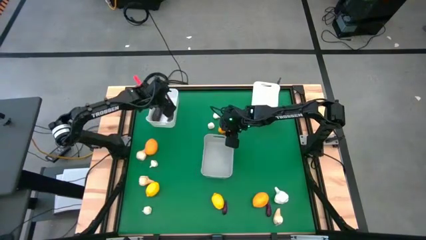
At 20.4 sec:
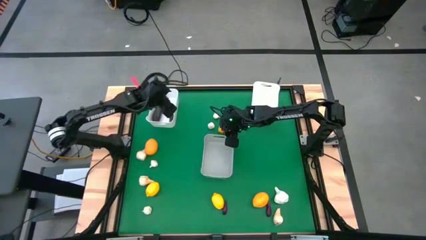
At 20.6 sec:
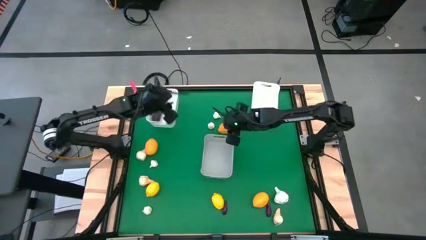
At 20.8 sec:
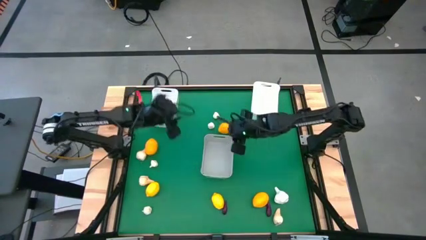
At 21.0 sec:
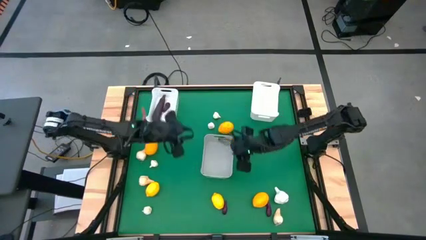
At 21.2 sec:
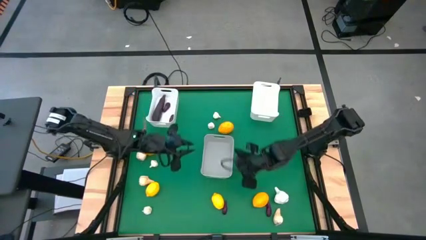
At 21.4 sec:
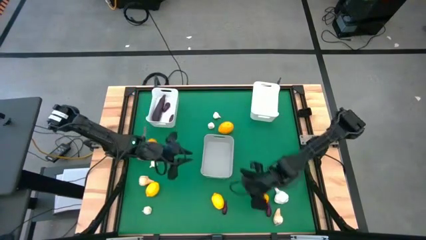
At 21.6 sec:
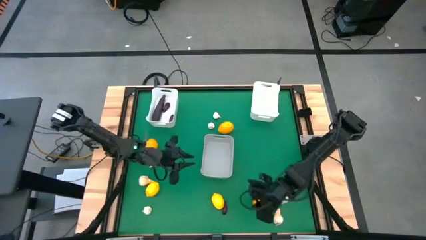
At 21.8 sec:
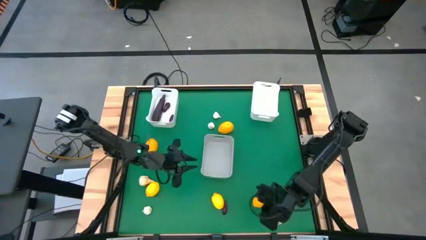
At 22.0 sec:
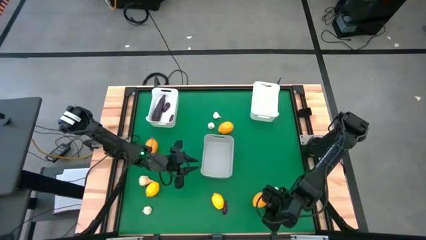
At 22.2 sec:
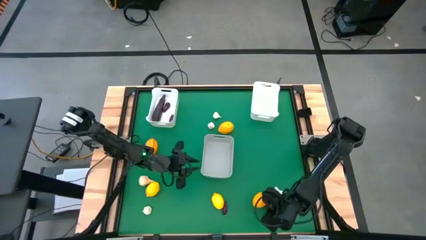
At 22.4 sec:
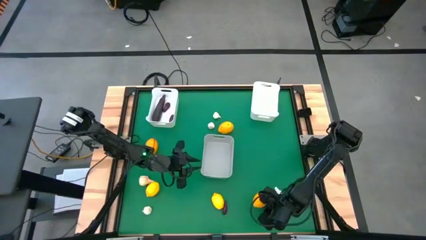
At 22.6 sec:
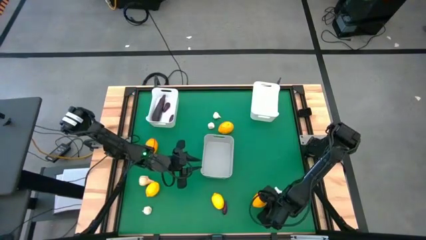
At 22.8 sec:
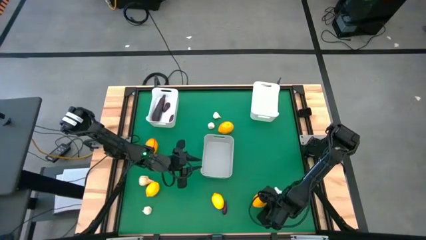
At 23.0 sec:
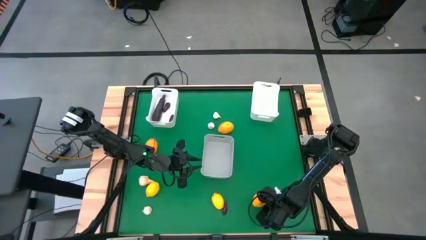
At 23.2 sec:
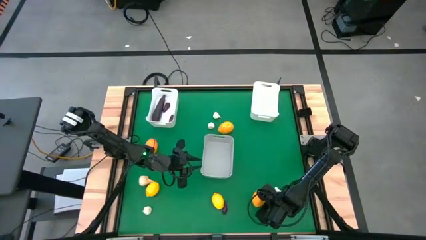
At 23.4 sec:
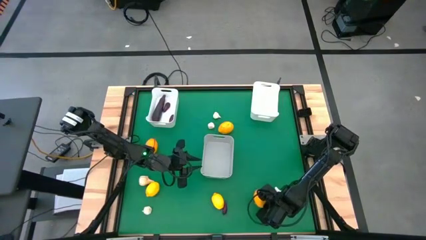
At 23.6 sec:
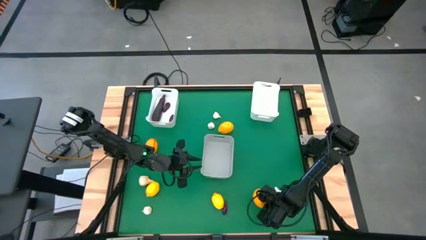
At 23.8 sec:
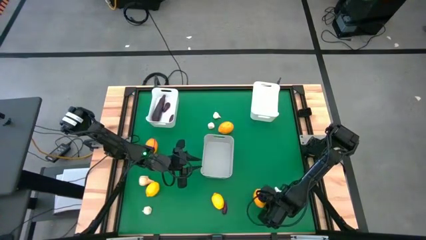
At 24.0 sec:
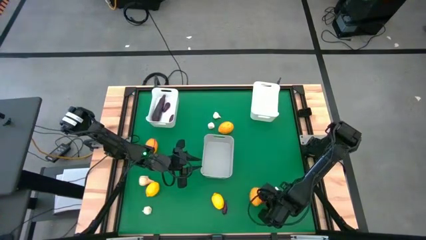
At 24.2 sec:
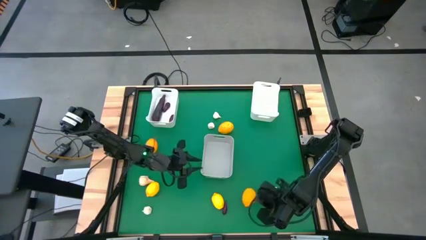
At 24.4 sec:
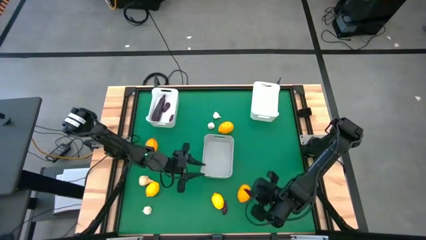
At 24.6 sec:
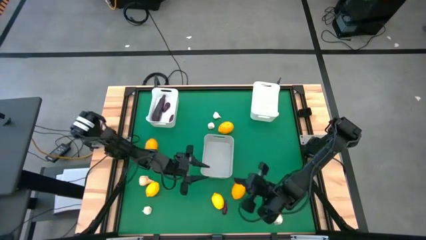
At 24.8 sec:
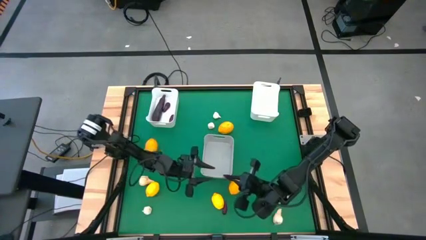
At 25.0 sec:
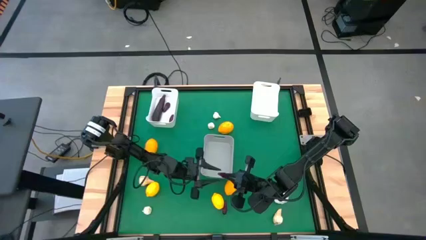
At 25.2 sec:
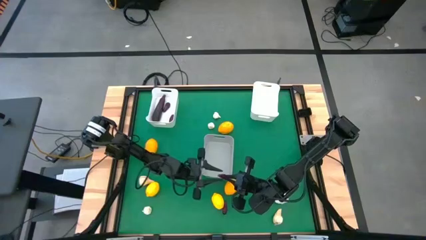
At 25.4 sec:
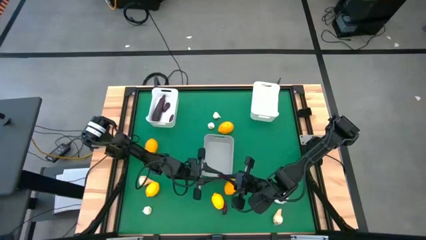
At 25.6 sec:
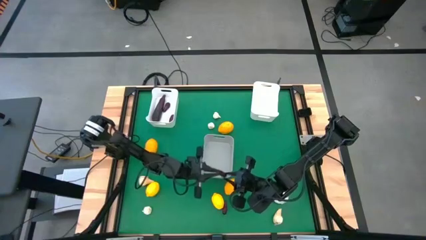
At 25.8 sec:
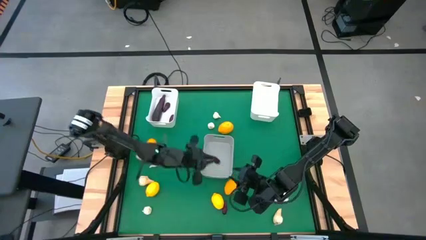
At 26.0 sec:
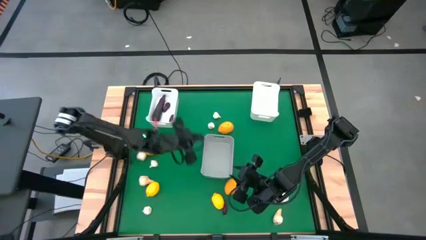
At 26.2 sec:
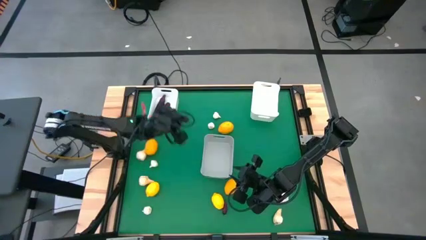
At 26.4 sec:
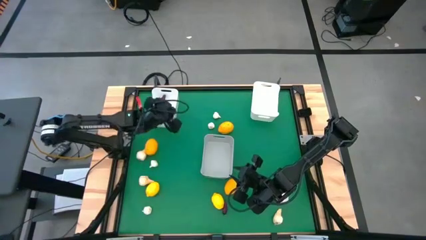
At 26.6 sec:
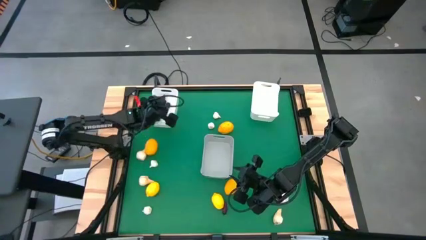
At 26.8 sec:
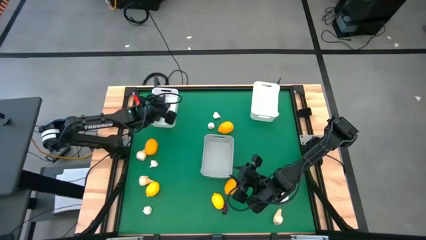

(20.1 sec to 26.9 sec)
Task: Sort produce into baskets
Put the eggplant into the left white bin

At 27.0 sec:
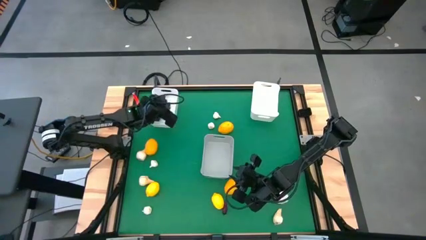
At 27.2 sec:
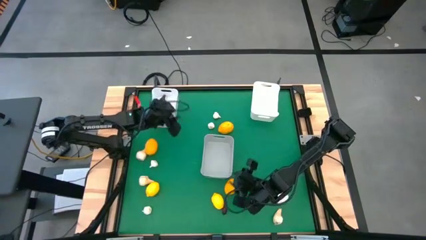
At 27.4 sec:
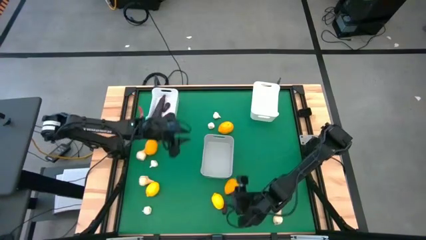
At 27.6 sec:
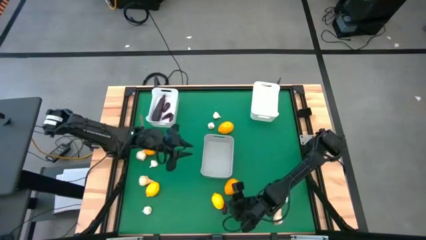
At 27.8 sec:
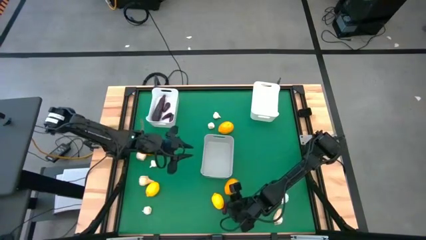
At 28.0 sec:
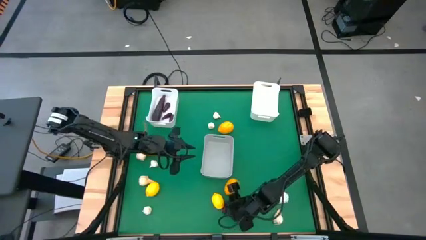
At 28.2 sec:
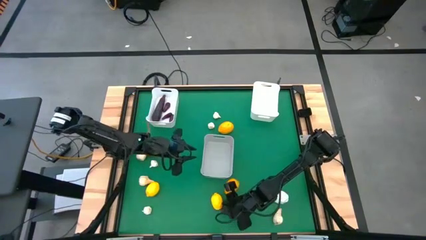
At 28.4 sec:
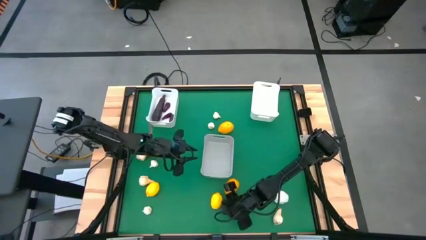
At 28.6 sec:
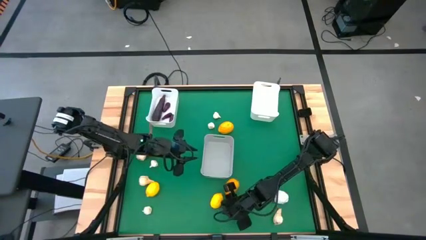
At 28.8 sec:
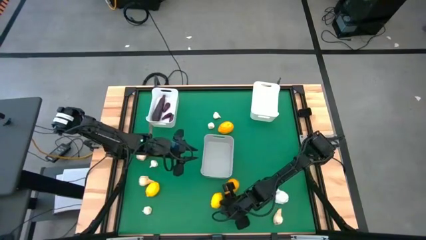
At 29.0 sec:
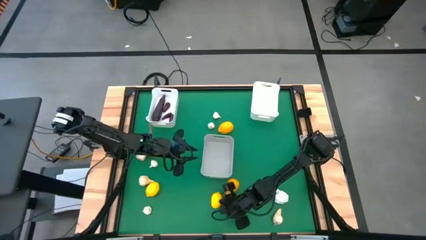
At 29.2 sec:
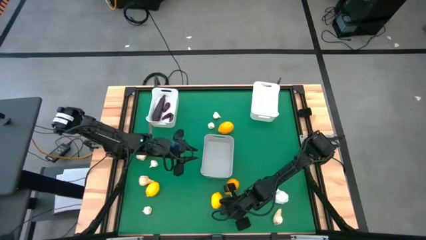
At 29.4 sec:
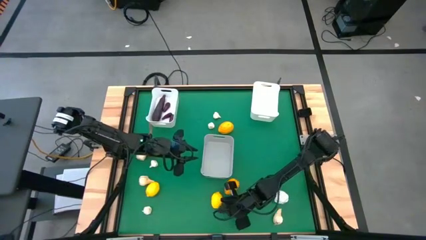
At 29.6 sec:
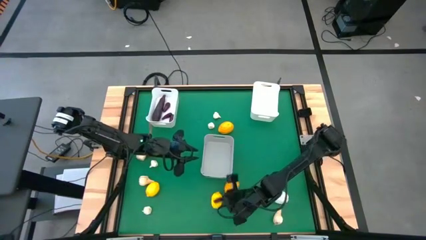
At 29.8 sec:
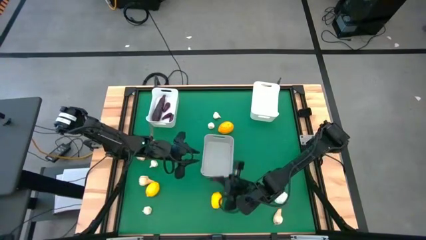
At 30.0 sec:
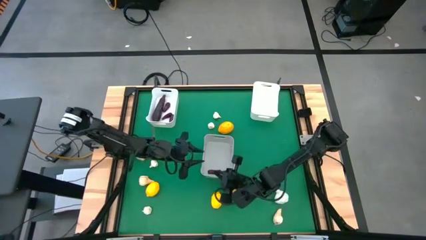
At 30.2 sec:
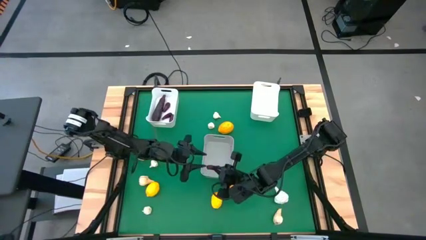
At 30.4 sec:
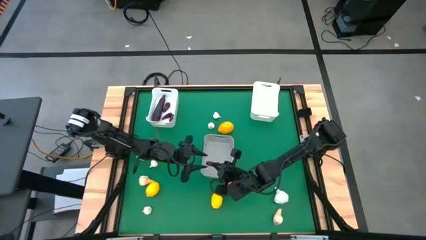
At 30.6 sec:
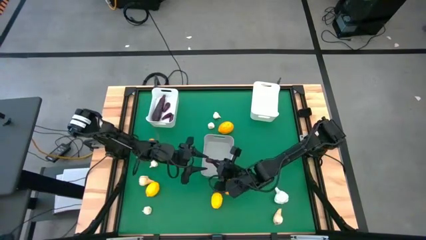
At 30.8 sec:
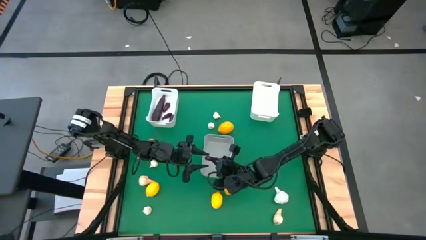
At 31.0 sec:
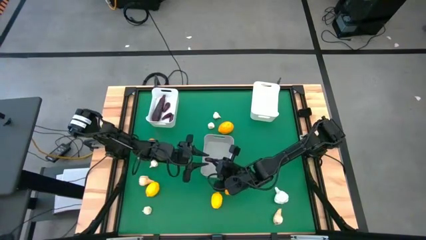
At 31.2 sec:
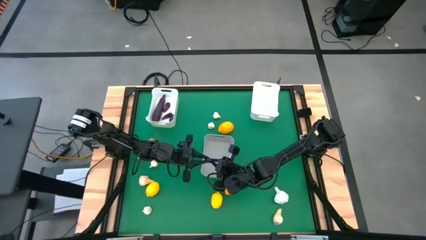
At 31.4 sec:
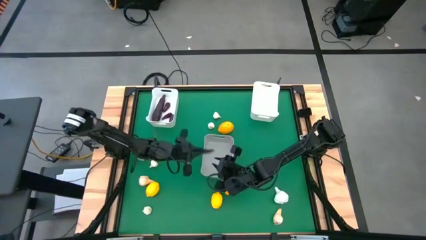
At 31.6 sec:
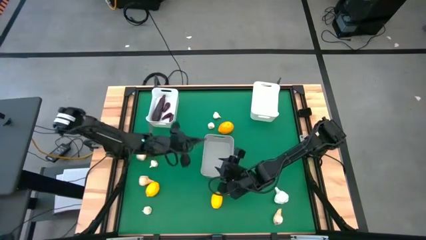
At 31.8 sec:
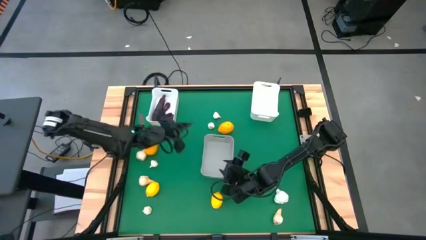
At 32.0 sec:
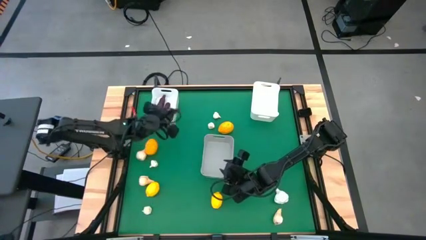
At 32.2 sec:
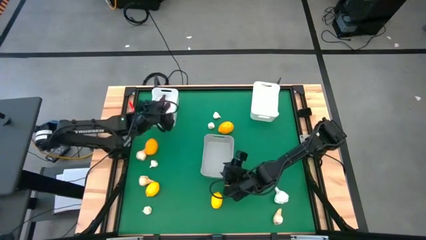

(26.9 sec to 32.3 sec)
Put the eggplant into the left white bin

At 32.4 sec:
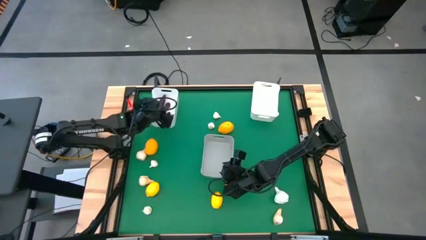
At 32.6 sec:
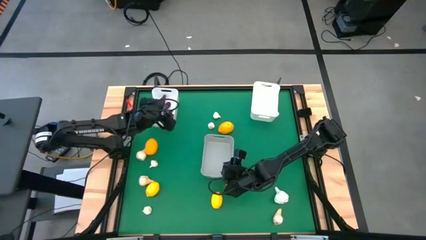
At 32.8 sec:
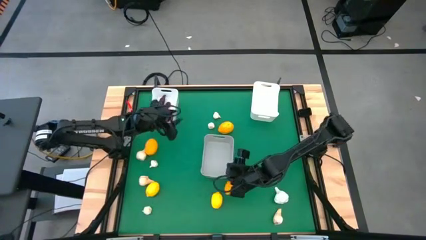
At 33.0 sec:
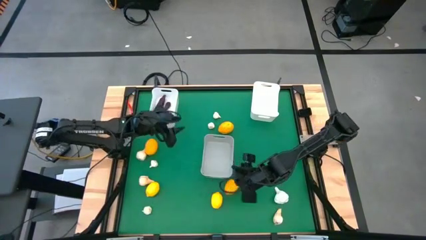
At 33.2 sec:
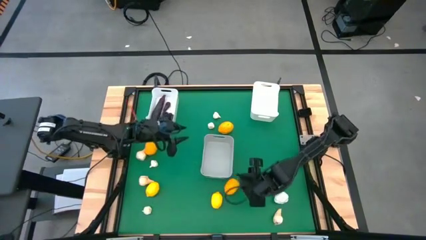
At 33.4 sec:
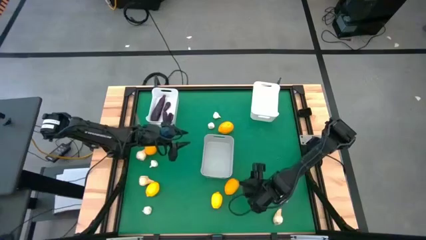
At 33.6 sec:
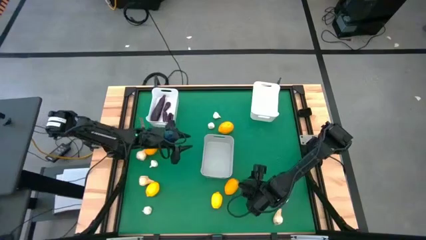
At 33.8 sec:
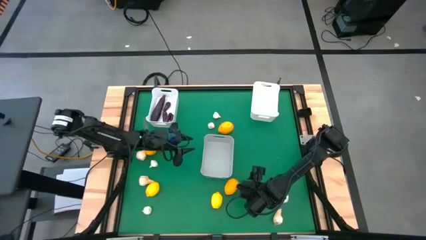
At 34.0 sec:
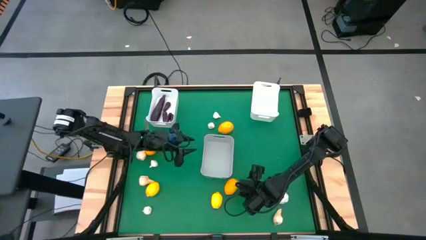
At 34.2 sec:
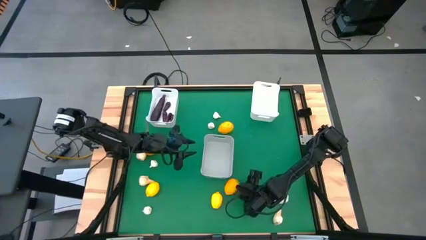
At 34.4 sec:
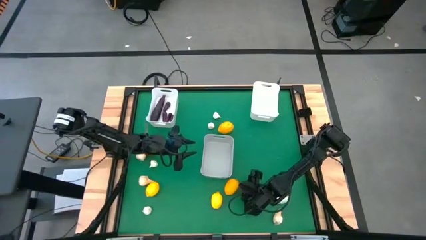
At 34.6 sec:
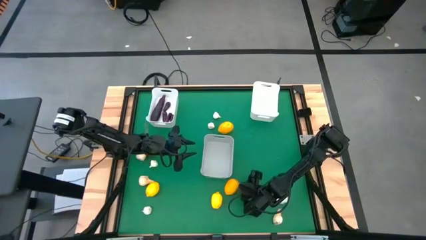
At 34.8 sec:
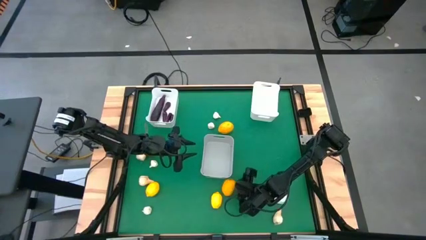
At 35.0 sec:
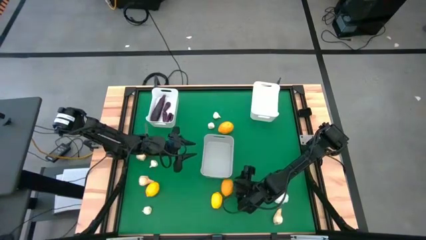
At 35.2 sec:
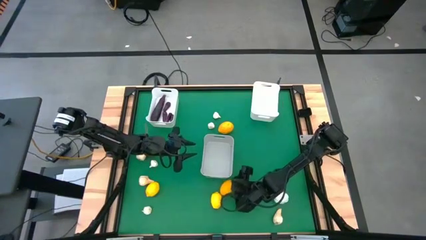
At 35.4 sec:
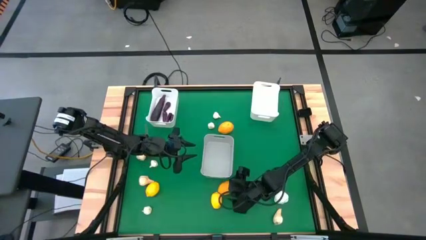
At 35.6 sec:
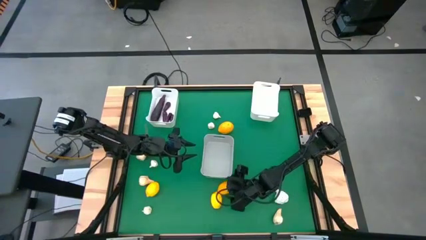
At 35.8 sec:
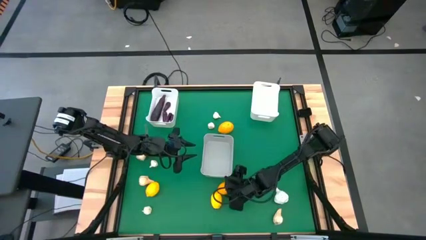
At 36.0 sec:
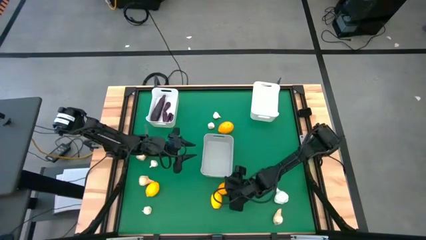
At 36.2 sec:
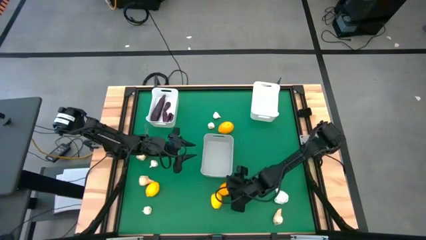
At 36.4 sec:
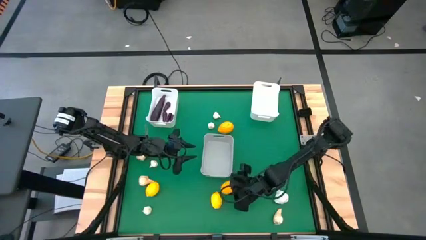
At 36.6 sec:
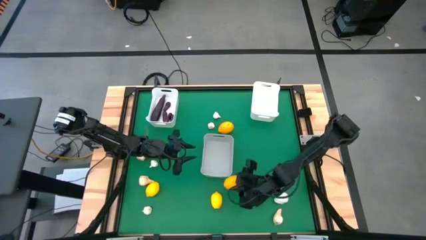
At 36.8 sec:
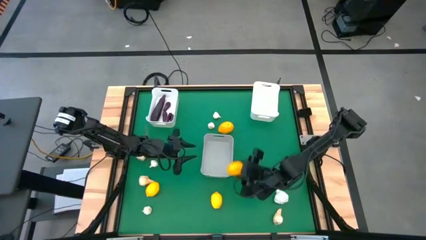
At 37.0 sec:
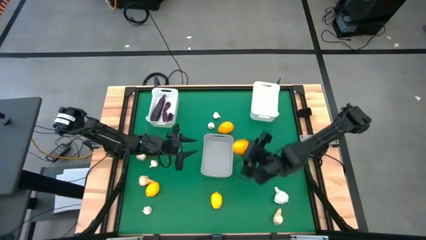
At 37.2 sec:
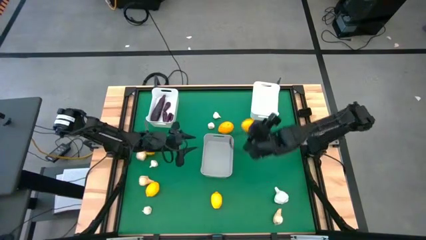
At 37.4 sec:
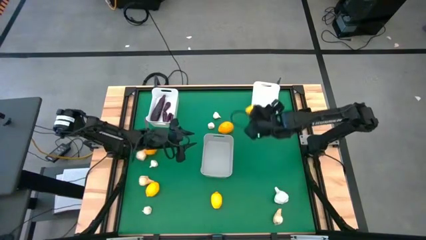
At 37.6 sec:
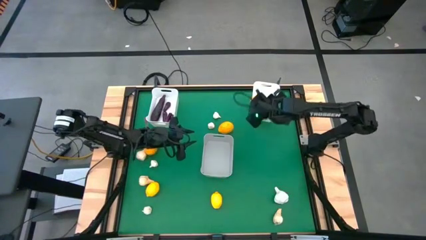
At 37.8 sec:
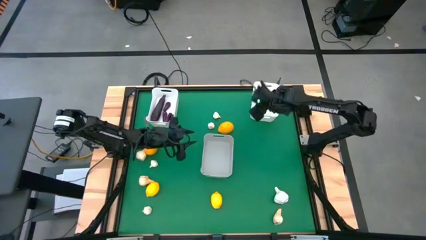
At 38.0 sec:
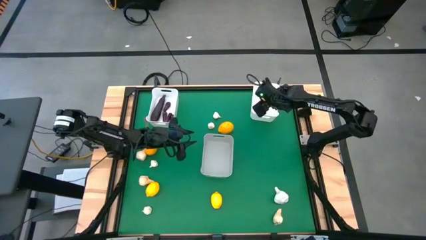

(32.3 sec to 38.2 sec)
Put the lemon into the right white bin
